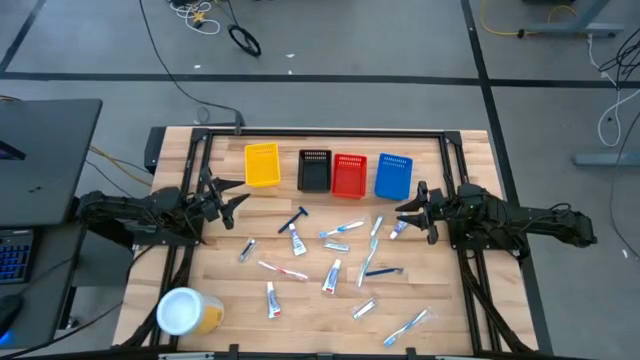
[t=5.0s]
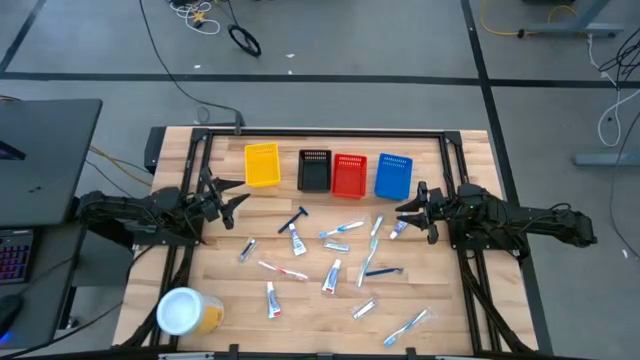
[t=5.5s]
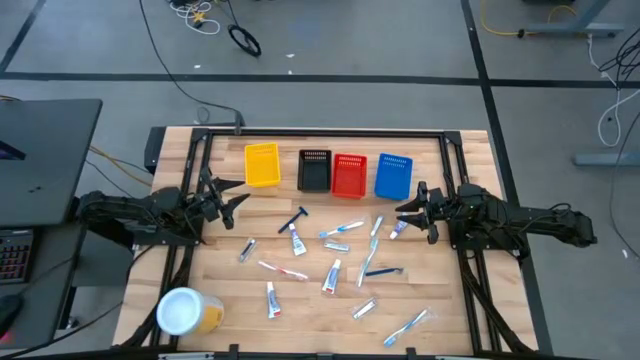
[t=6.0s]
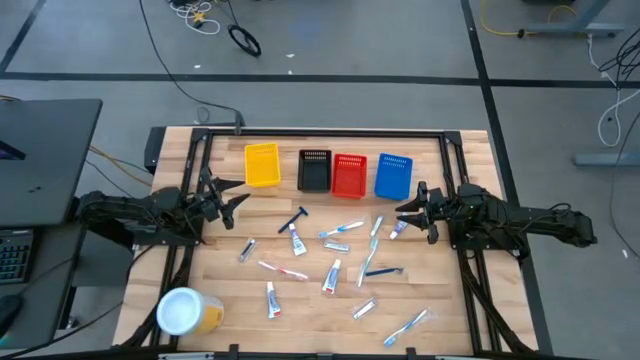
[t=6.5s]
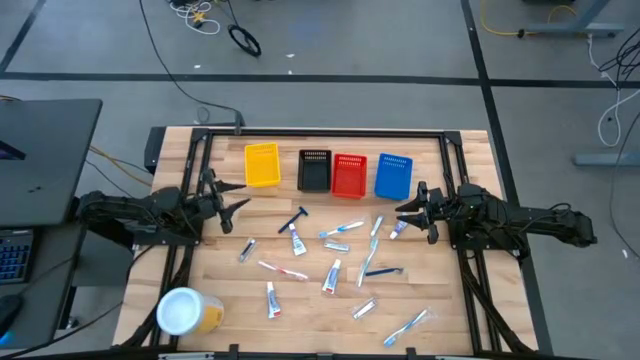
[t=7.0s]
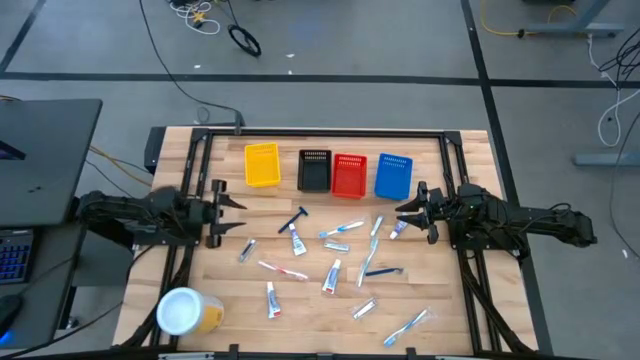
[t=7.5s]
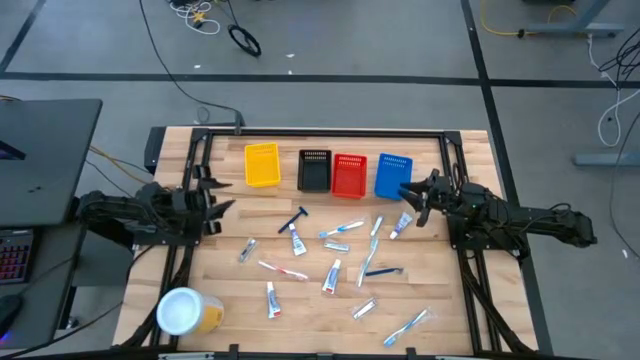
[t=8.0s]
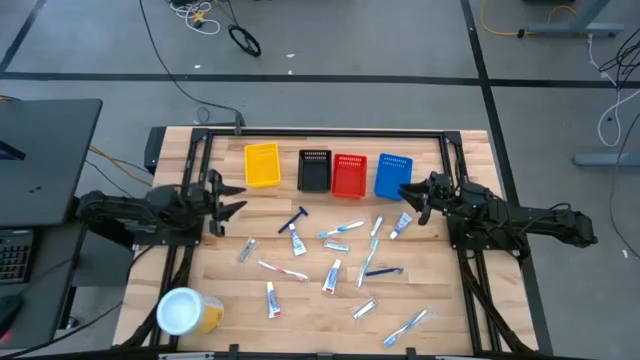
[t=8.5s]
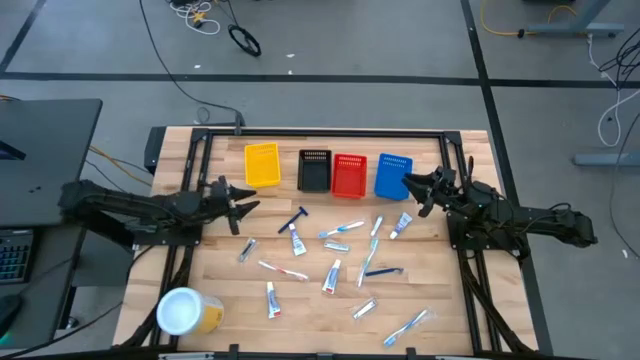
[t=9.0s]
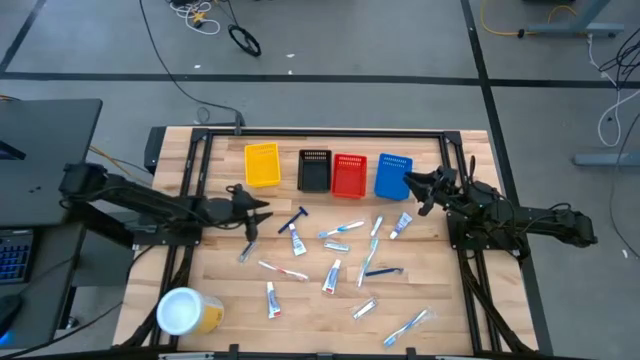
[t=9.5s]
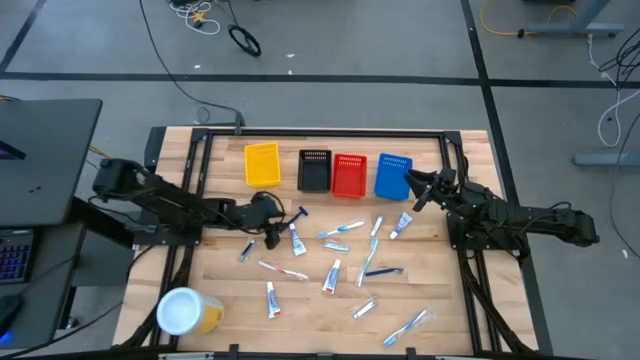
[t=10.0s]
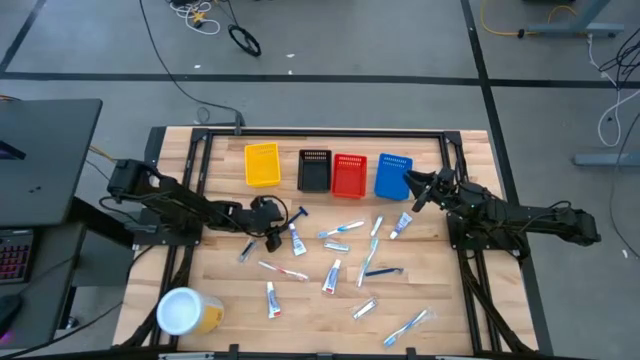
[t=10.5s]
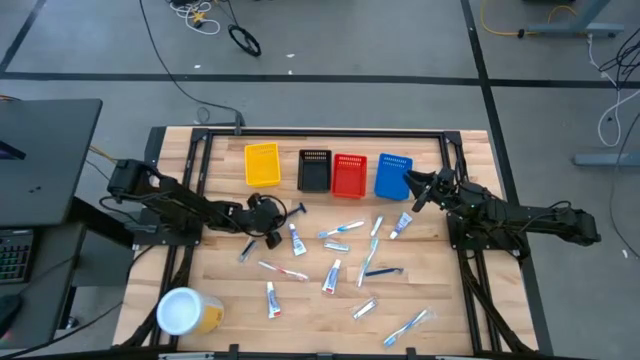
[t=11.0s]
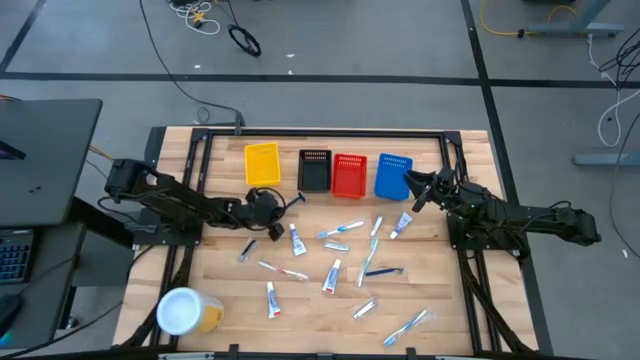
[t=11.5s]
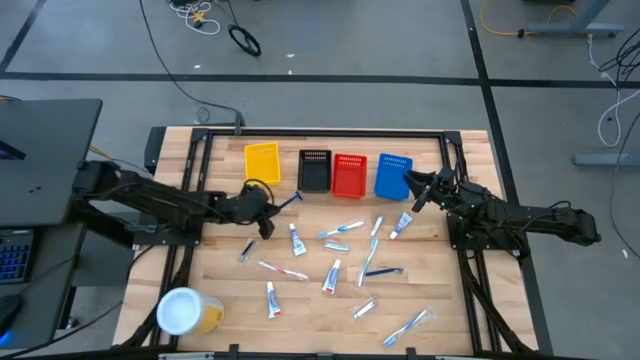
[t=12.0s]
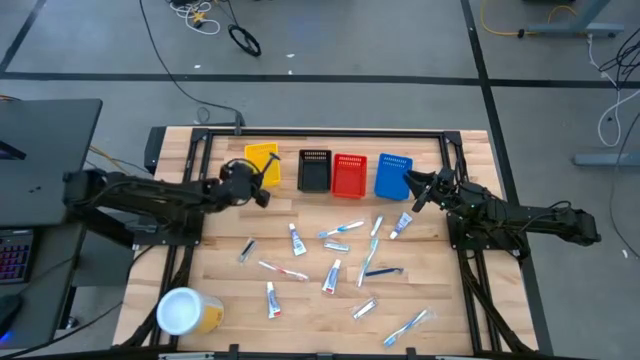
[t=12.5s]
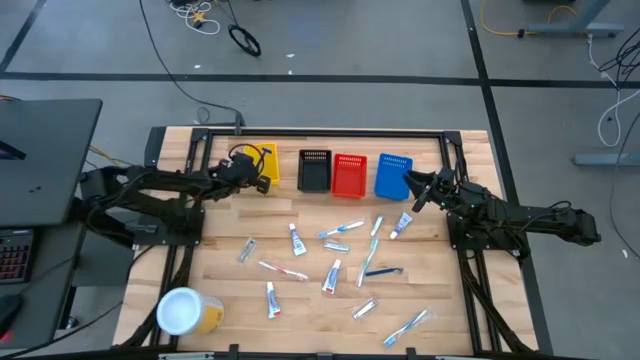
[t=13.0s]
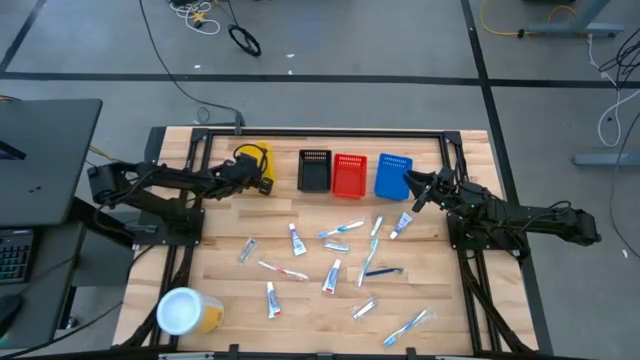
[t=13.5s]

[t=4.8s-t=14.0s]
Task: Pick & Place Travel size toiletries
Put the blue shaver into the yellow basket

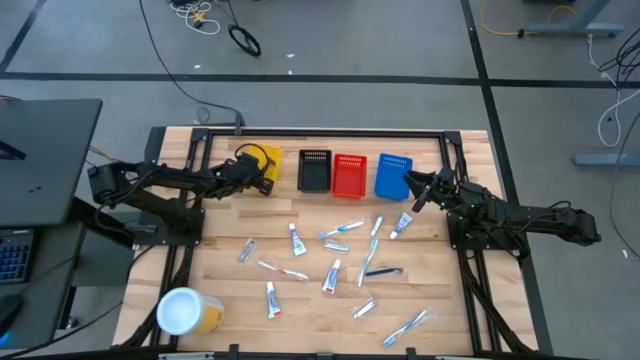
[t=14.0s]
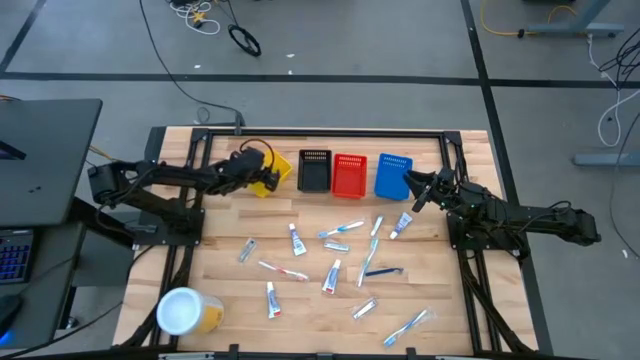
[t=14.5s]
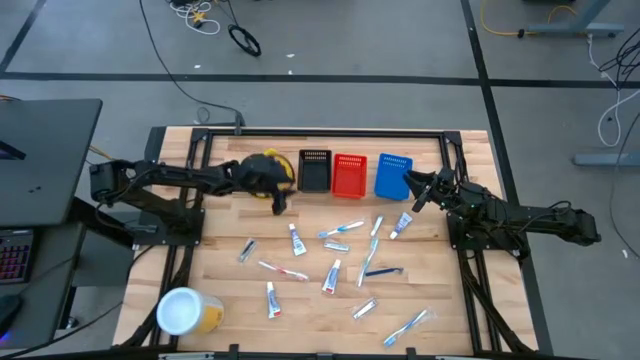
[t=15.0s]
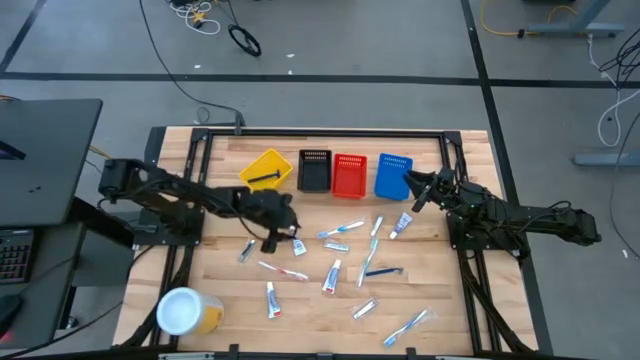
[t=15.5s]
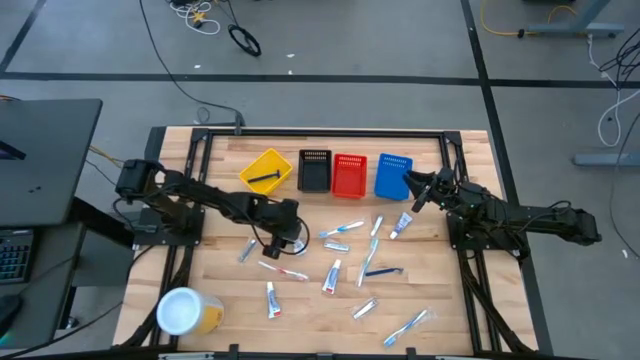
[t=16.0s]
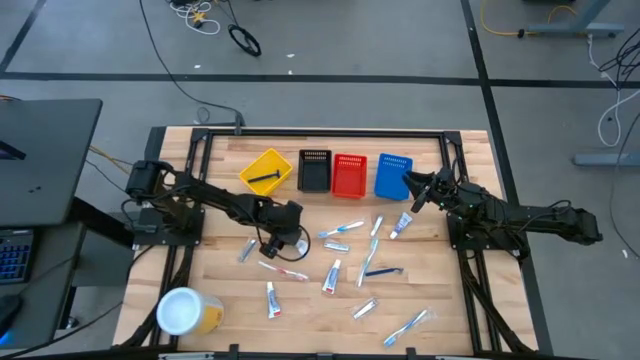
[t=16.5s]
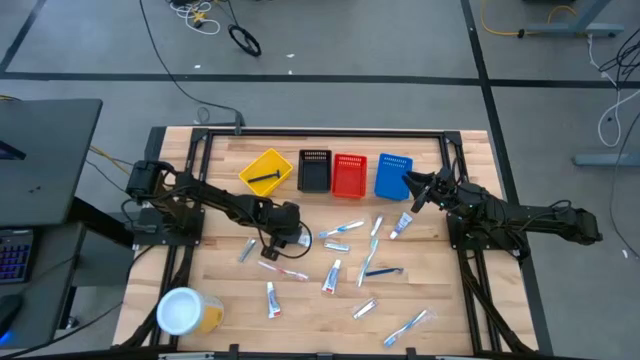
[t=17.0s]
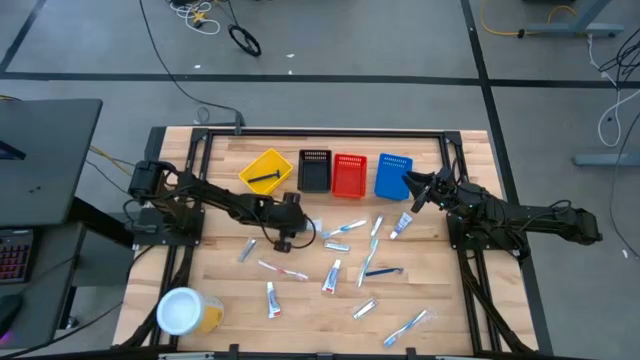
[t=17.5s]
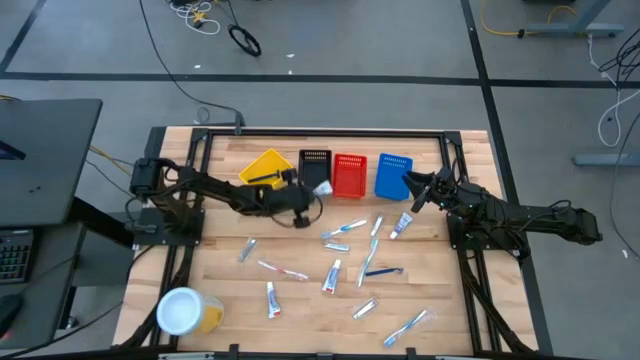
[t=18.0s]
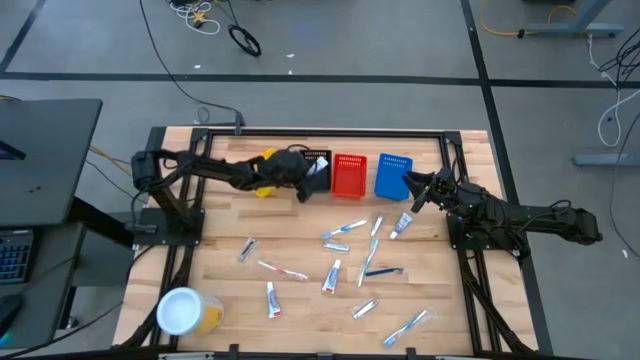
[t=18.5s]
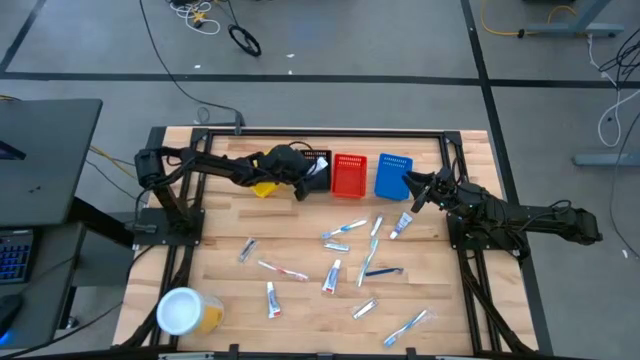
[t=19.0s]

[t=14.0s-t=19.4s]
Put the white toothpaste into the black basket

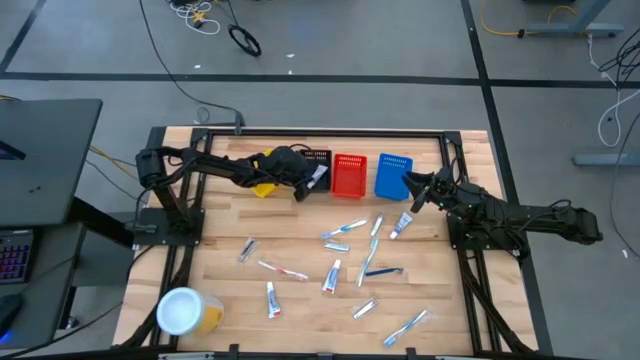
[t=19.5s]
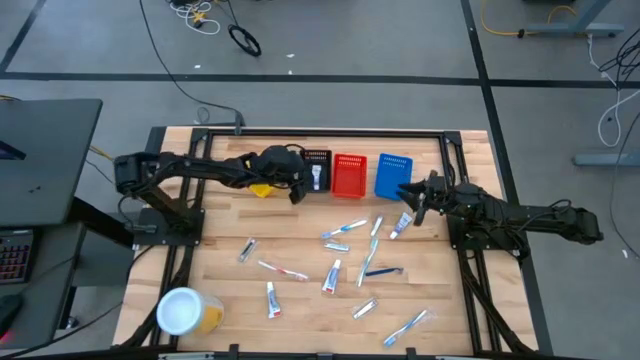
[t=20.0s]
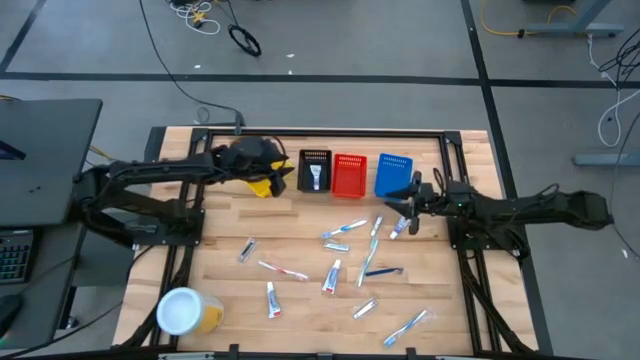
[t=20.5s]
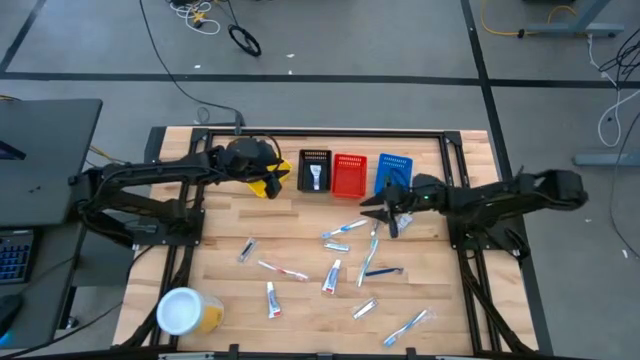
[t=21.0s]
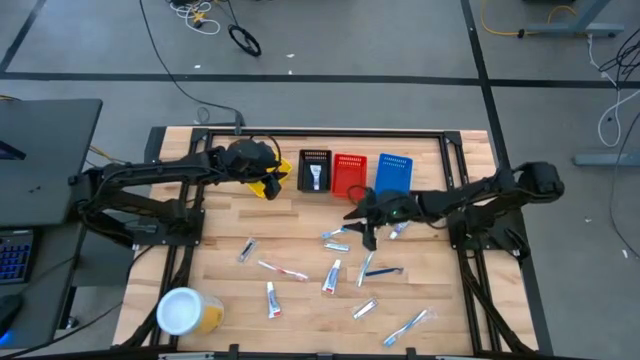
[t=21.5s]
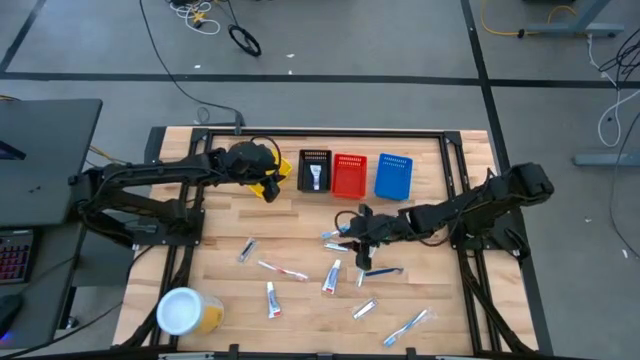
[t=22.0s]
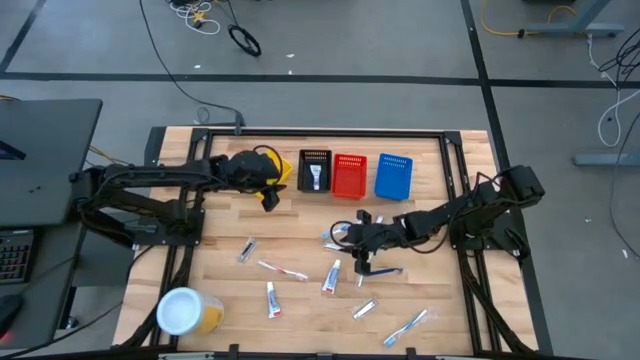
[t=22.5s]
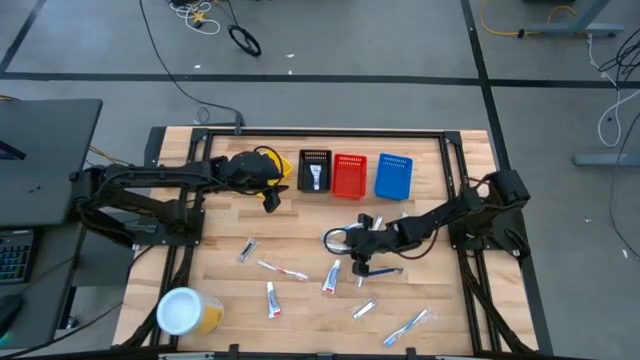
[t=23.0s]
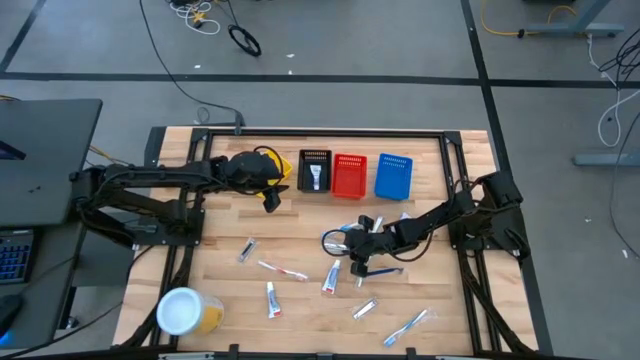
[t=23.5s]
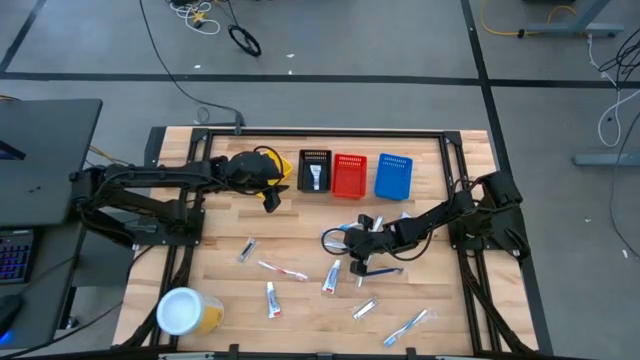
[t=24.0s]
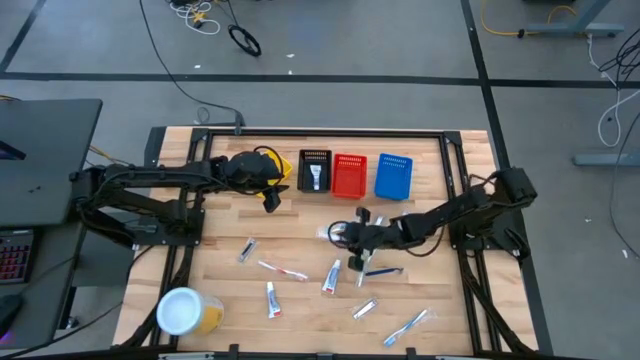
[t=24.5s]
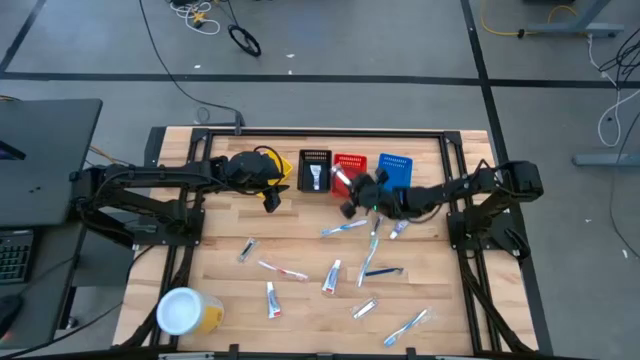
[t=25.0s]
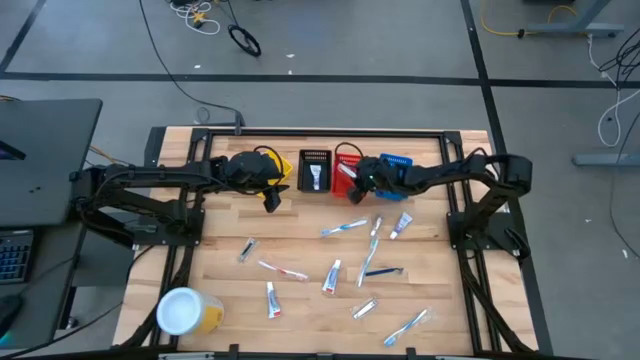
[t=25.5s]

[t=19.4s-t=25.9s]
Put the silver nail cutter into the red basket

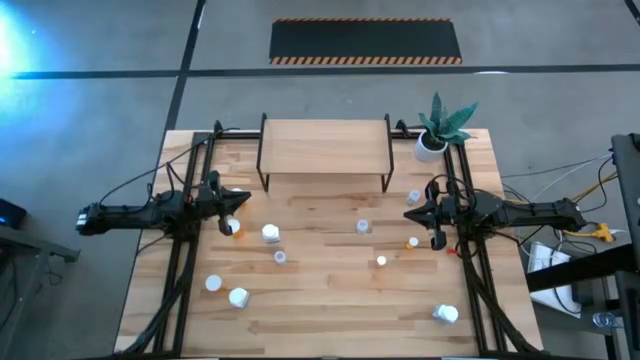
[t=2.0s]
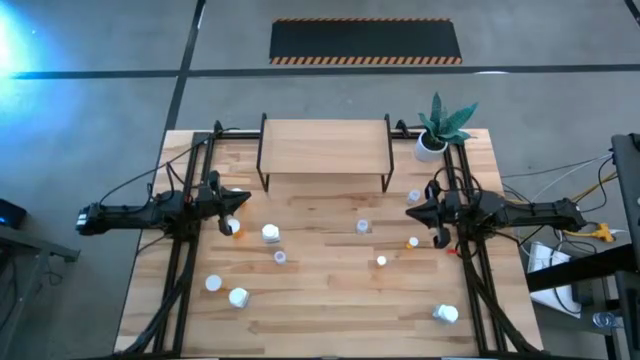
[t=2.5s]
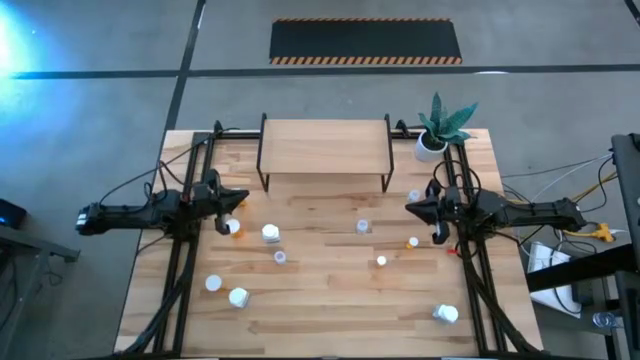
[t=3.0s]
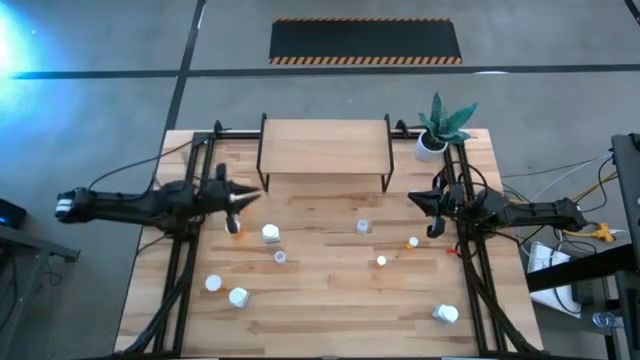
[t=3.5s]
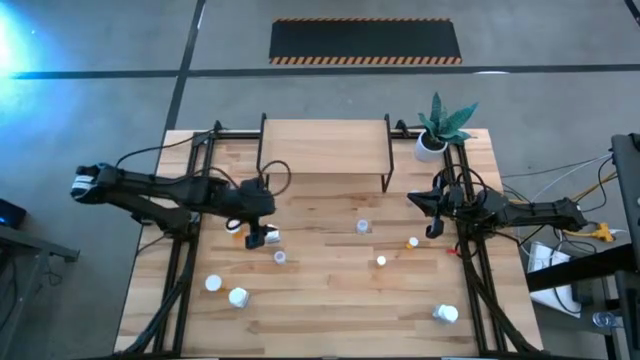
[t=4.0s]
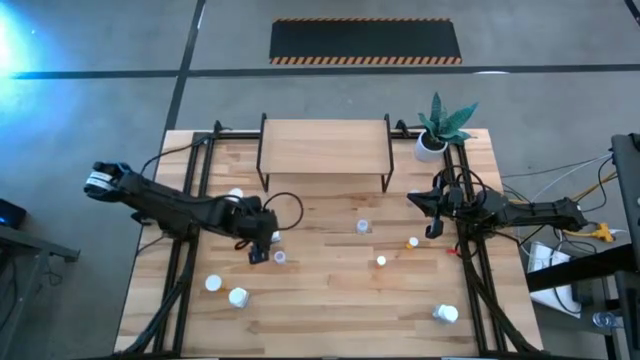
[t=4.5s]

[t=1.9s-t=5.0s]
Task: Pick and place medicine bottles onto shelf by color
Put the top left white pill bottle on the shelf
